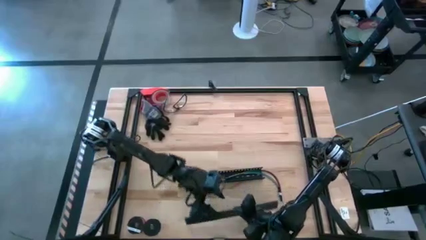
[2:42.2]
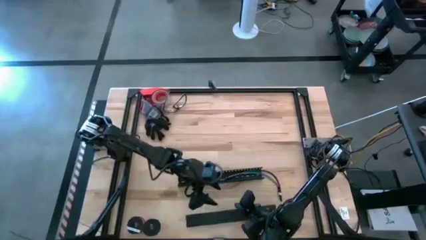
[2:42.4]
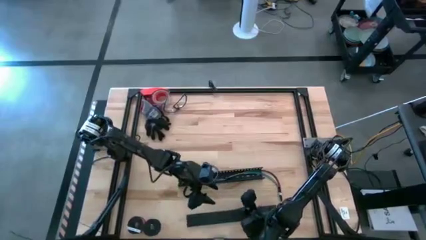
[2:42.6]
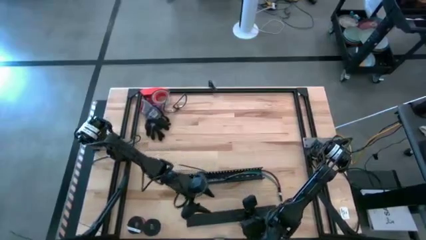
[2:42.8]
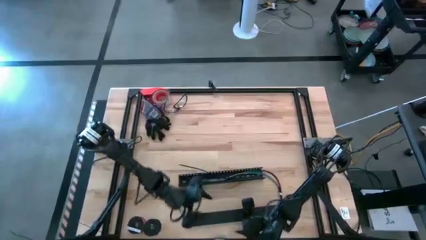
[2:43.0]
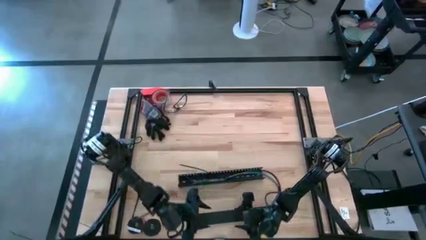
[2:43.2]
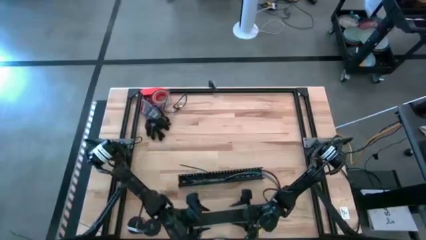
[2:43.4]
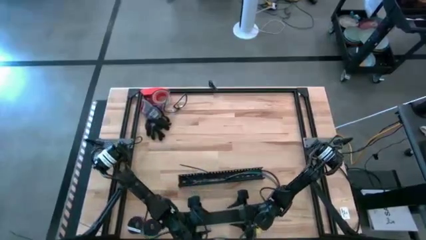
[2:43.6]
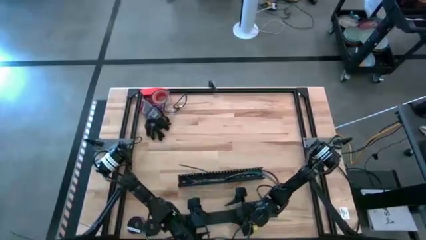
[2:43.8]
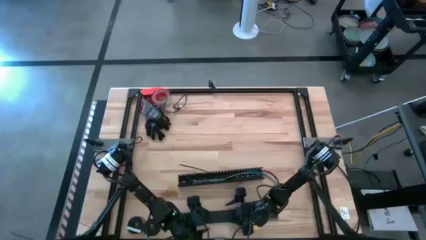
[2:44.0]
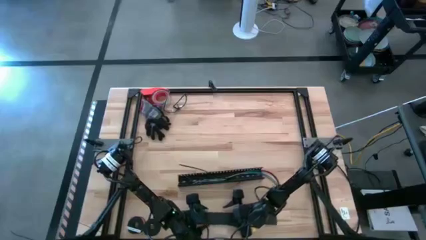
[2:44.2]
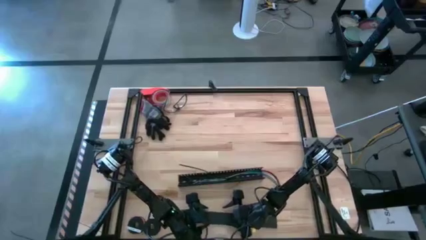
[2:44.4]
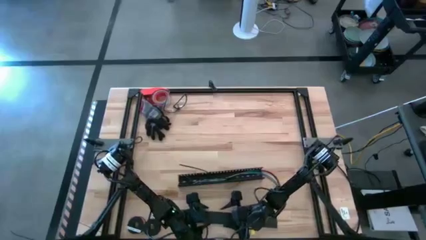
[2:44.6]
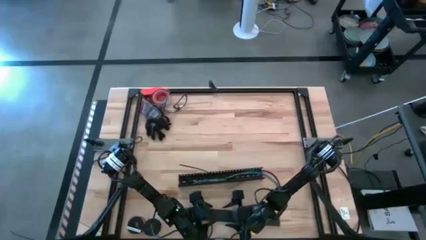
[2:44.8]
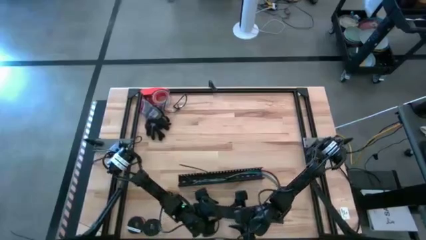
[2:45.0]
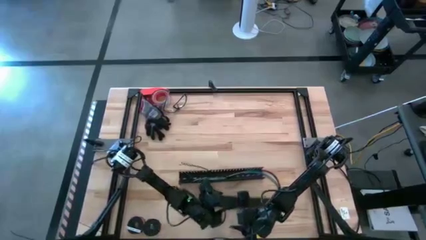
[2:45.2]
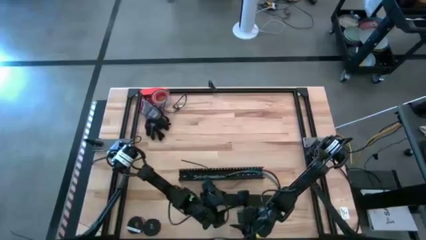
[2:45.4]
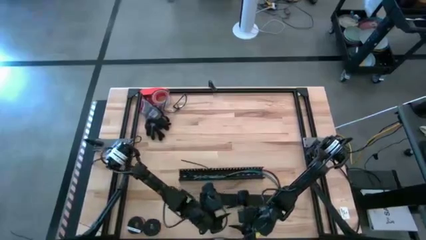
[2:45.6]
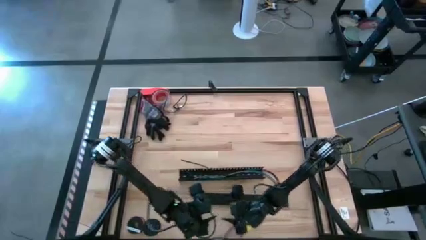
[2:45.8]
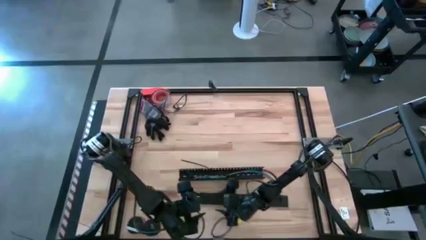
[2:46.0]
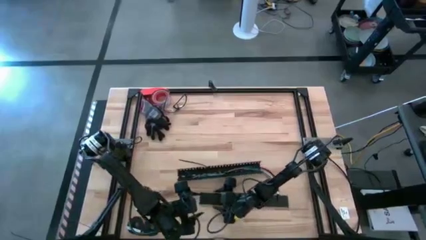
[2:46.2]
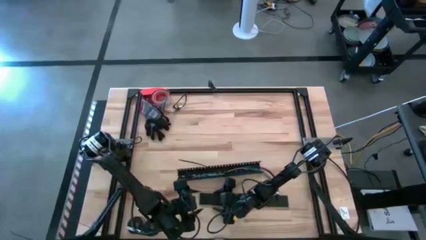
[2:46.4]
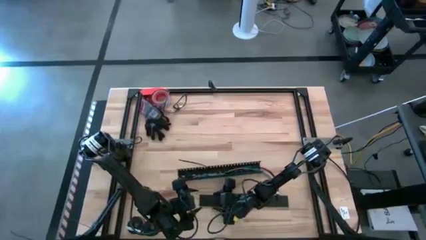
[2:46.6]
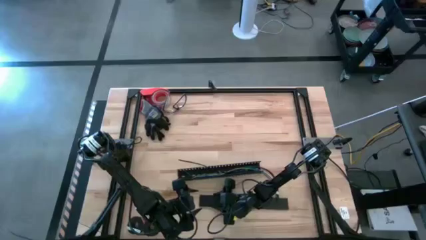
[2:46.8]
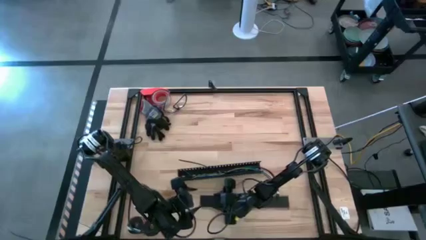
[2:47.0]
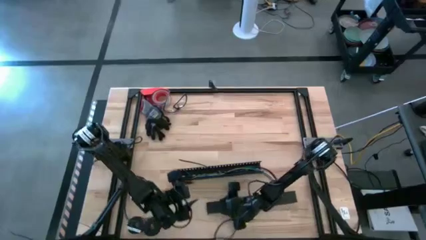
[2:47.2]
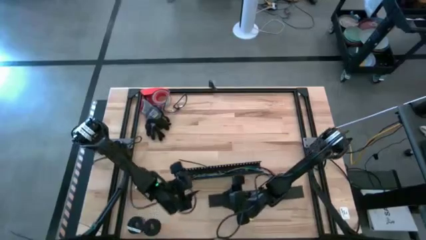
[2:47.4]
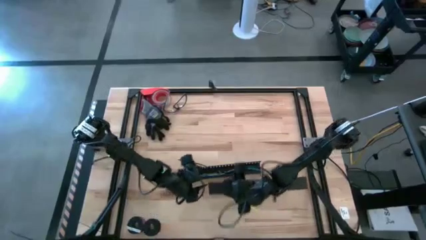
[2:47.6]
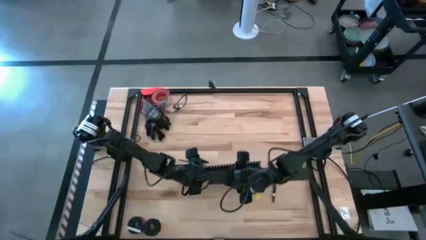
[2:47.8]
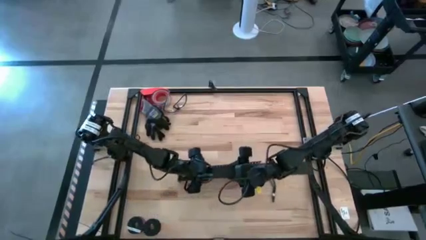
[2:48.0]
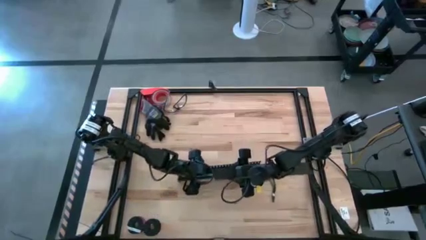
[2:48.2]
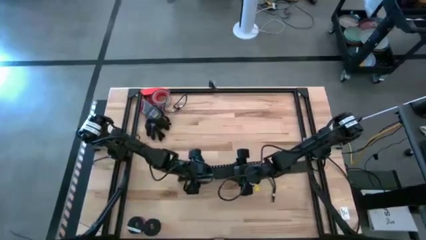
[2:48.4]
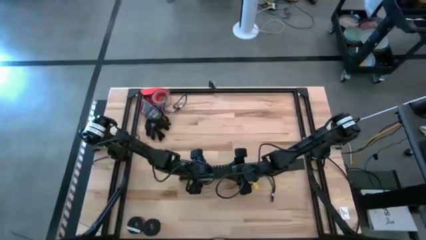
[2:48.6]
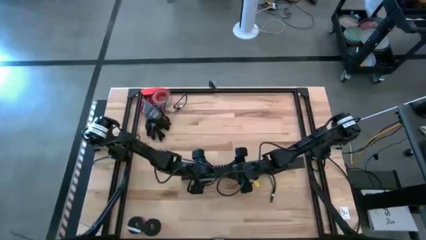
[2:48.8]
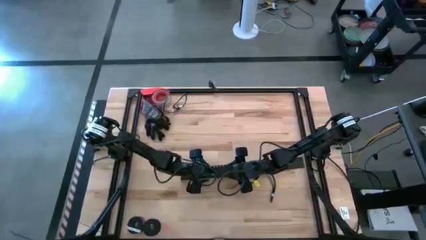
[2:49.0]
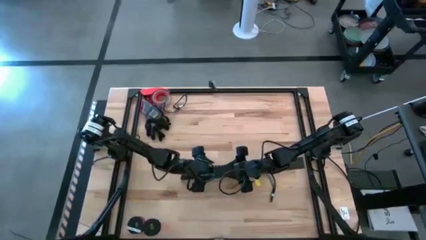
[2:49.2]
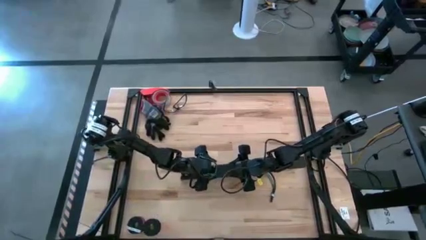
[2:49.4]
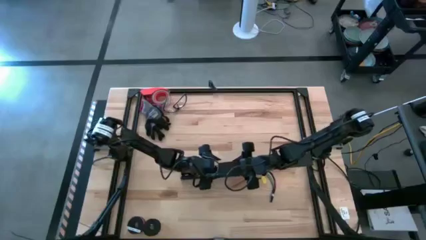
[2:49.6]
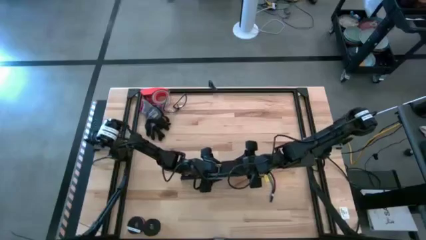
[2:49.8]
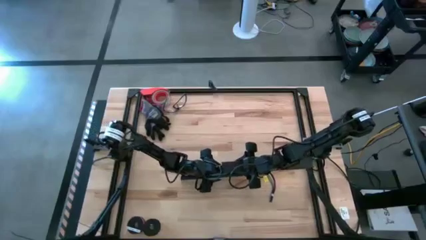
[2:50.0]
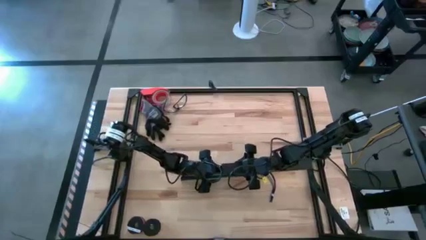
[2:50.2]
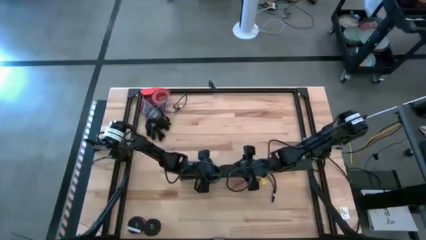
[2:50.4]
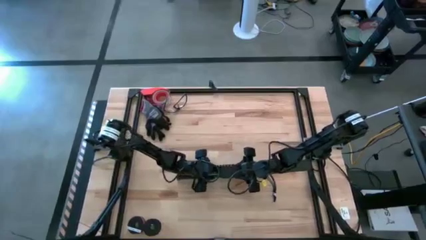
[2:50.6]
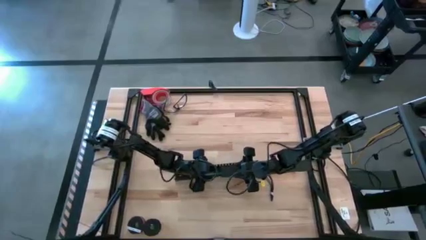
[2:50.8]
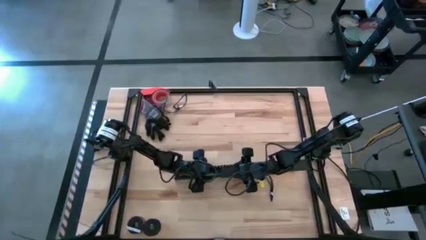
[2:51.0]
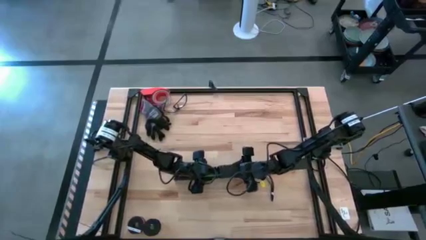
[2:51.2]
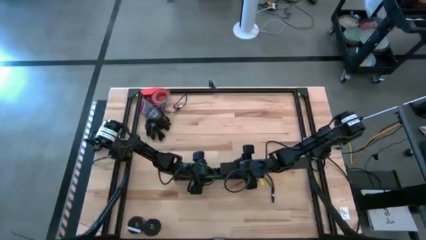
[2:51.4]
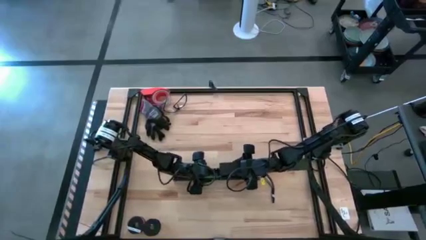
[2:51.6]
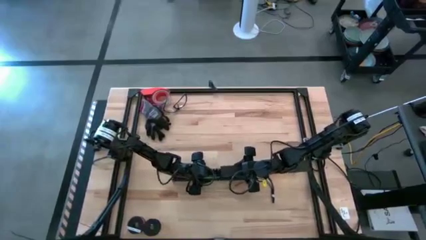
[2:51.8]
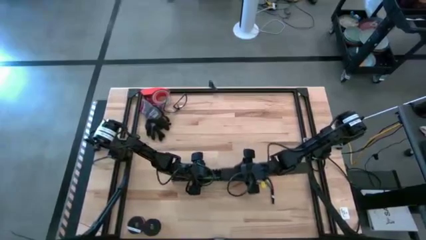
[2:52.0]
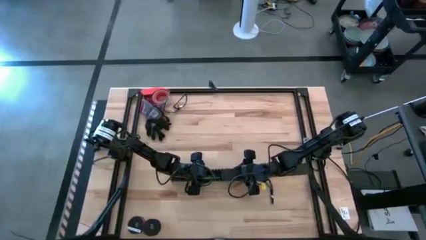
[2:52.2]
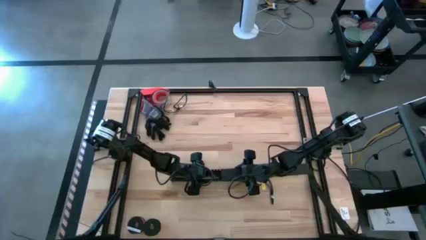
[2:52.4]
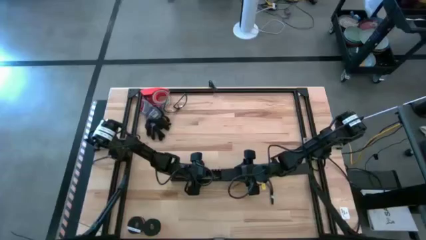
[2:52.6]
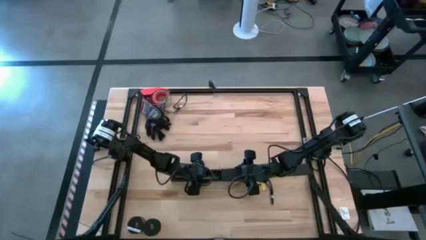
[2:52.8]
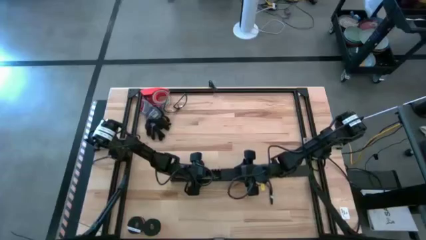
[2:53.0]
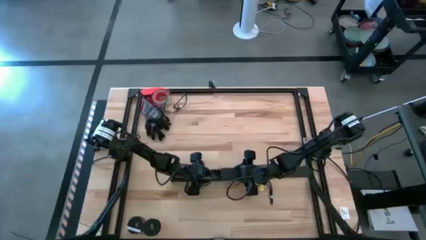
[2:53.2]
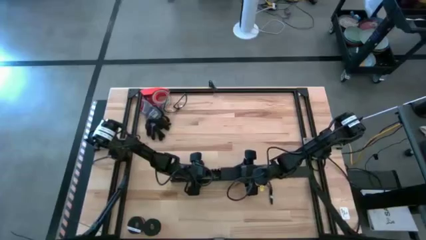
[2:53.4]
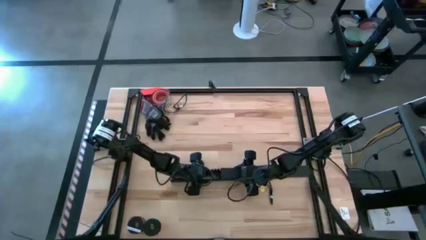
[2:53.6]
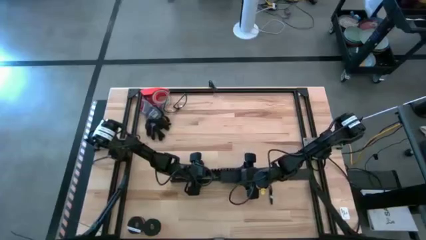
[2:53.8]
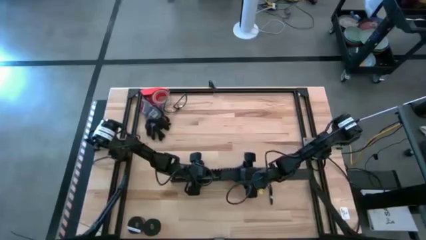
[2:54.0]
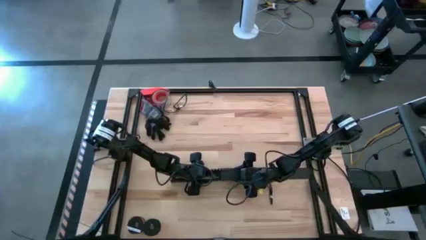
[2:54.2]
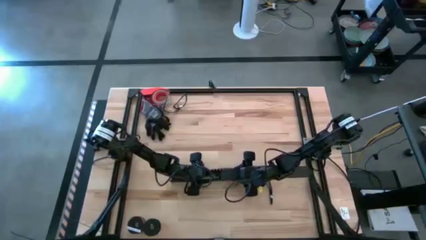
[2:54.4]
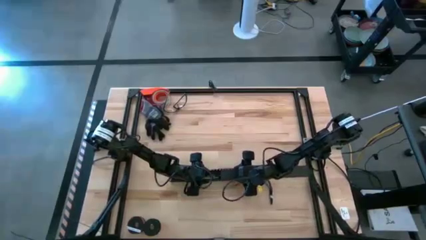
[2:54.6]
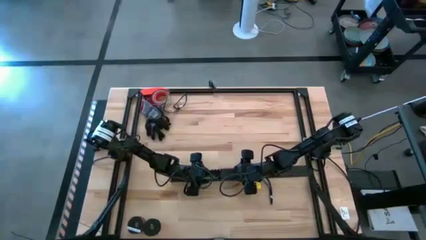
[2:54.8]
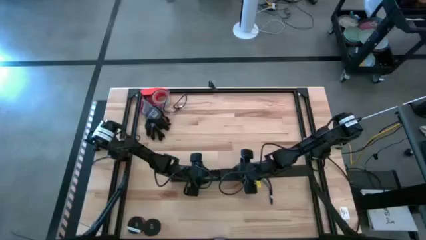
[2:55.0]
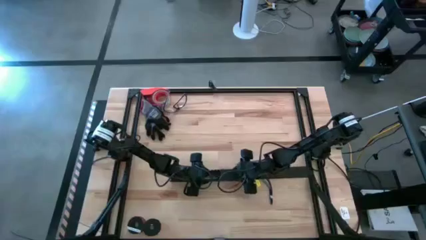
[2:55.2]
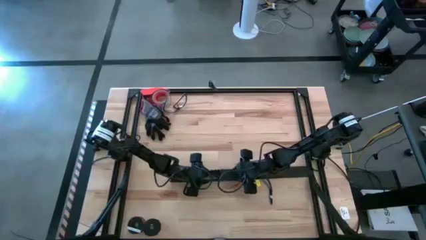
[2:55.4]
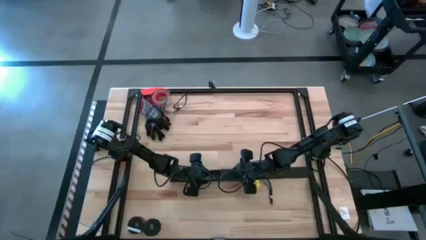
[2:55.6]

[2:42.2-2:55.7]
Task: Ziptie cables
Close the black cable duct

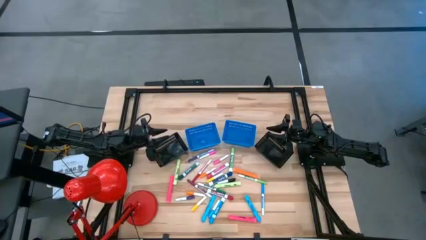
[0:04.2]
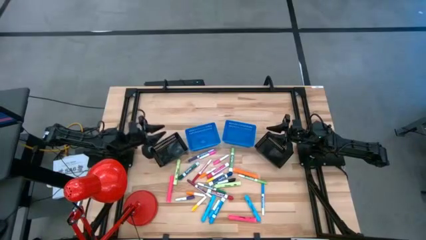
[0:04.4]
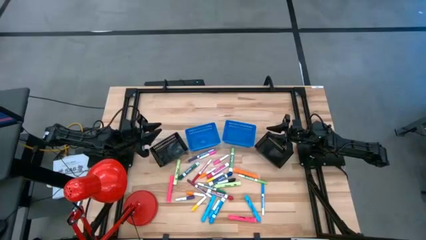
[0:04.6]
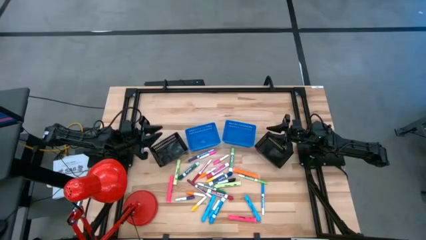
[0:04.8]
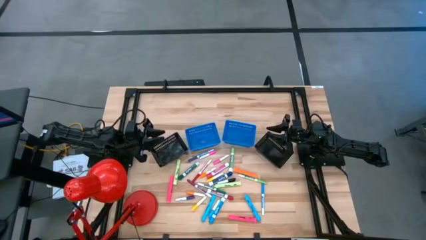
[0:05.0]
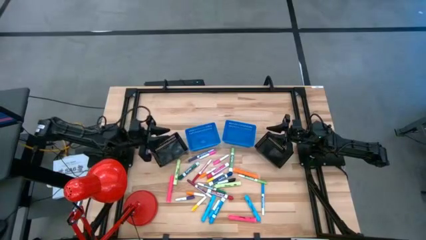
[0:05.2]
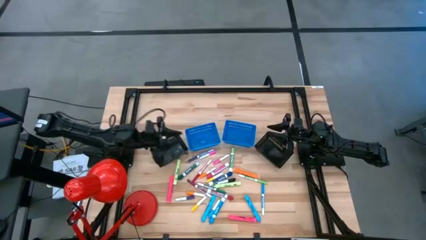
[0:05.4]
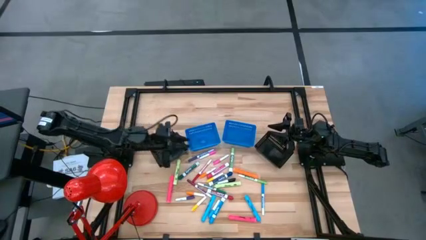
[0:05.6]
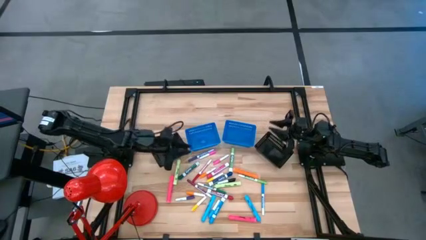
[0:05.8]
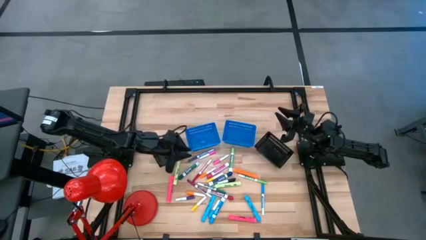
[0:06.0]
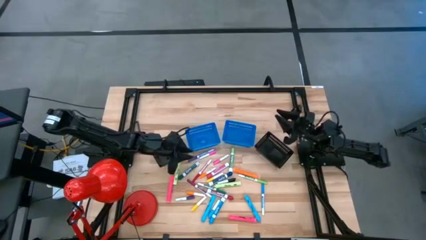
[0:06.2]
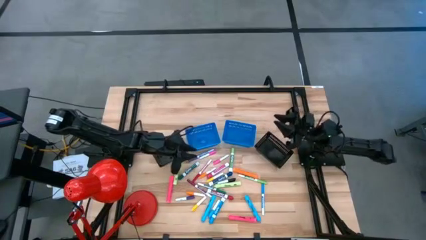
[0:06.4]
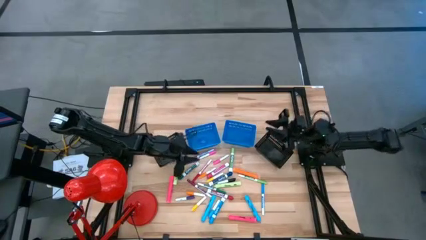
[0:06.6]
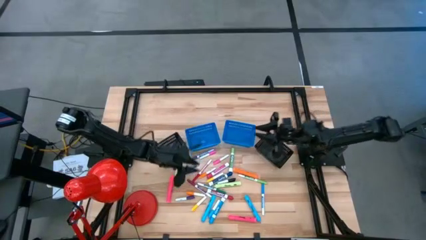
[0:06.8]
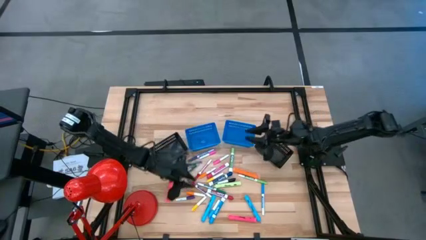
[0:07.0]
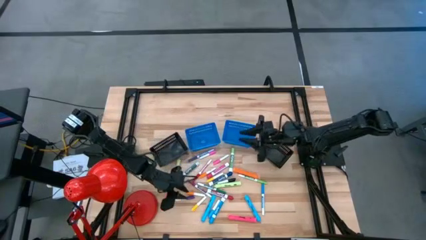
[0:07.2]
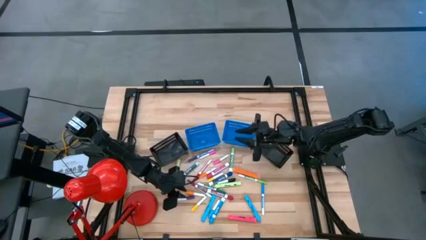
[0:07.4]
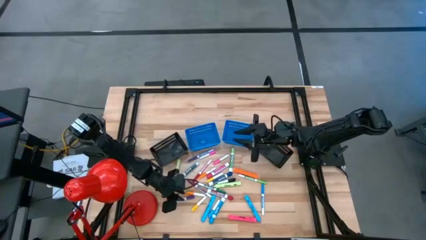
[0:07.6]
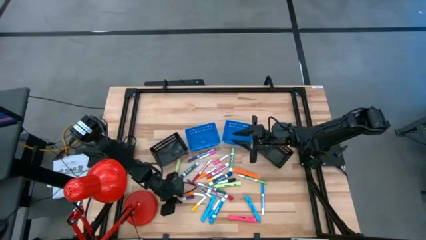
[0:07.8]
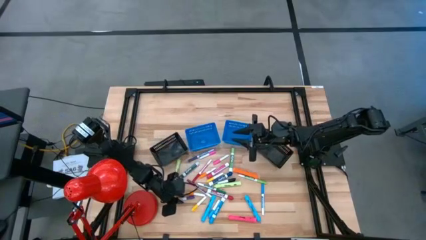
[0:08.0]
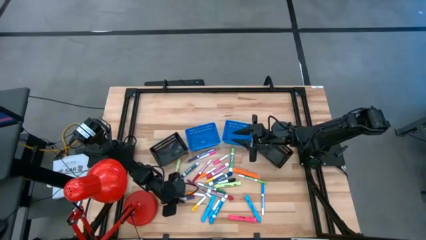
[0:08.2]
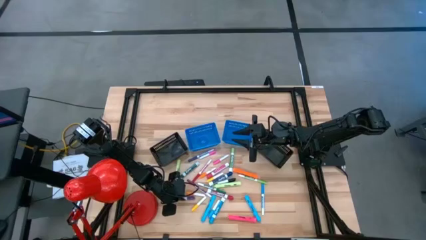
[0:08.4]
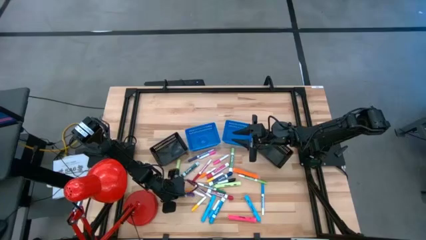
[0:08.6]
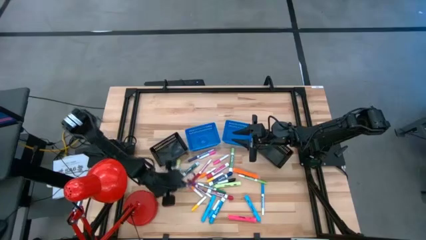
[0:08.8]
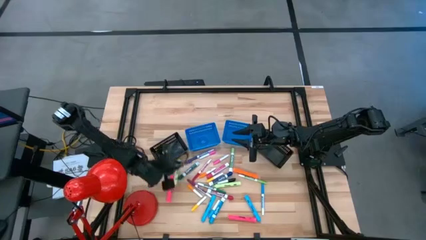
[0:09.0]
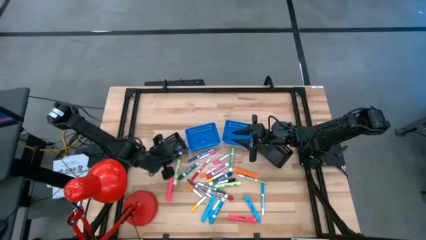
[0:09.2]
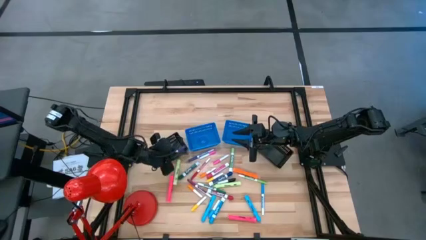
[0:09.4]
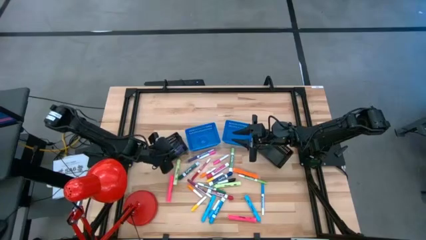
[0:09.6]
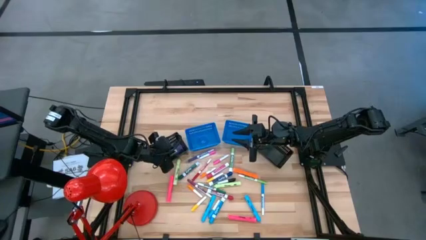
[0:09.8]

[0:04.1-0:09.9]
Task: Pick & Place Markers
Put the purple water marker into the left black bin
